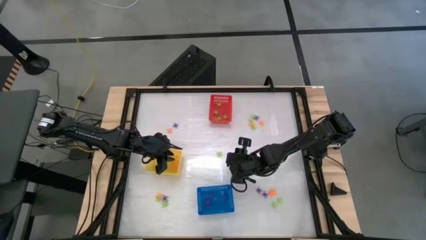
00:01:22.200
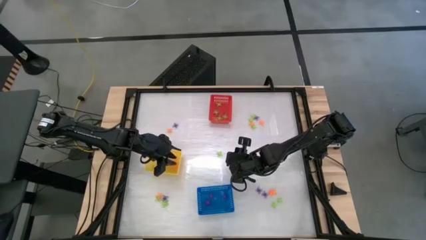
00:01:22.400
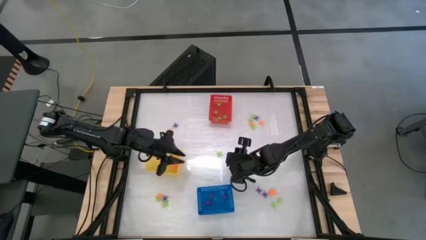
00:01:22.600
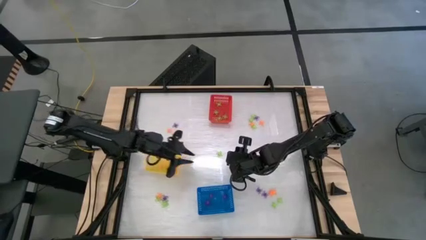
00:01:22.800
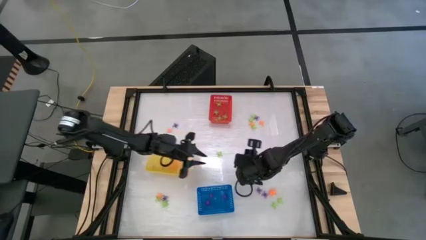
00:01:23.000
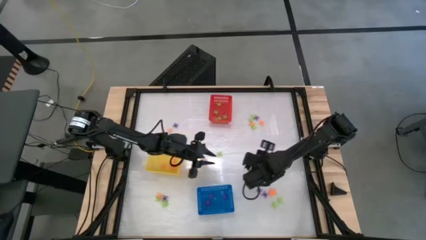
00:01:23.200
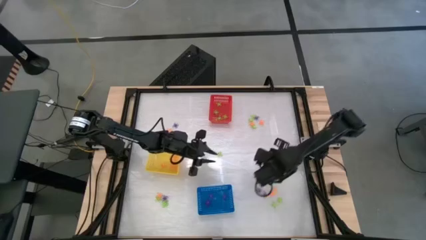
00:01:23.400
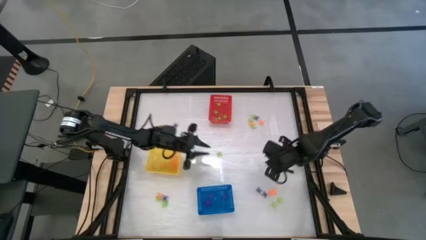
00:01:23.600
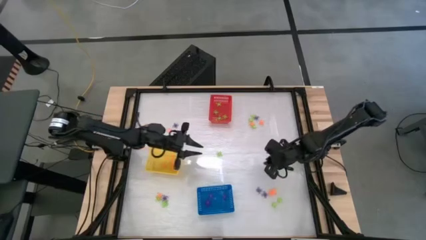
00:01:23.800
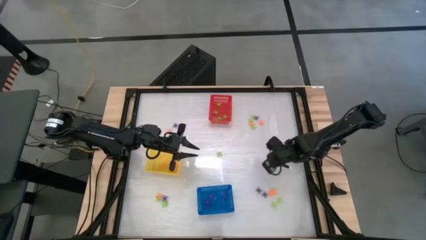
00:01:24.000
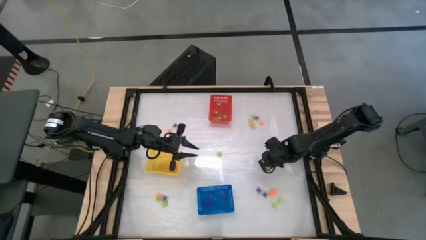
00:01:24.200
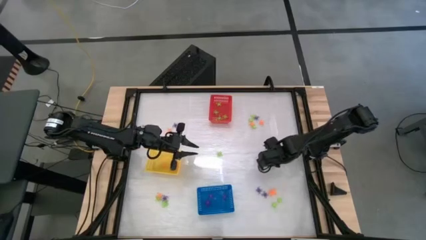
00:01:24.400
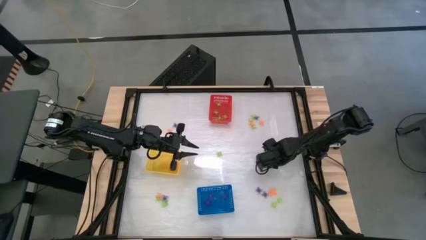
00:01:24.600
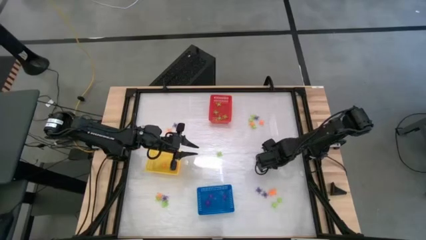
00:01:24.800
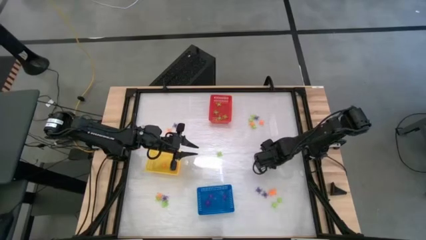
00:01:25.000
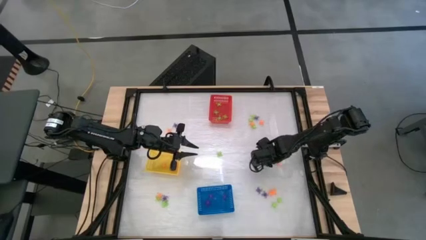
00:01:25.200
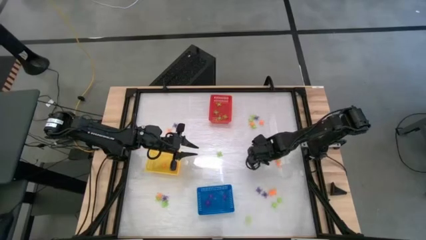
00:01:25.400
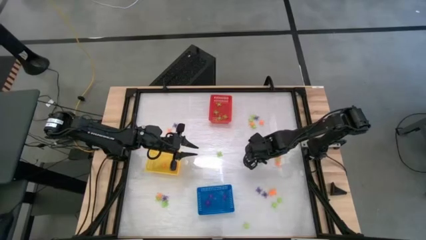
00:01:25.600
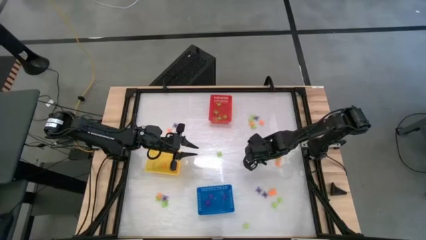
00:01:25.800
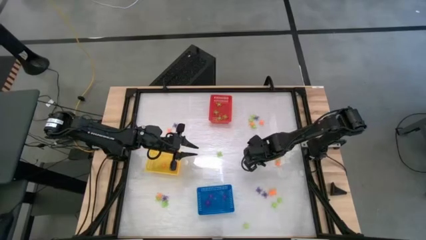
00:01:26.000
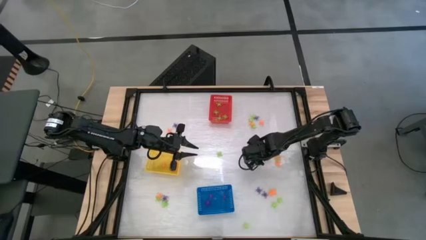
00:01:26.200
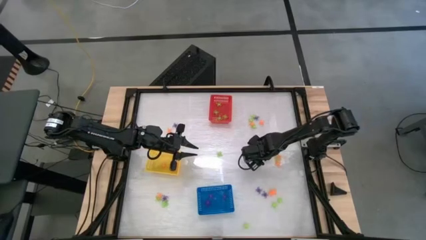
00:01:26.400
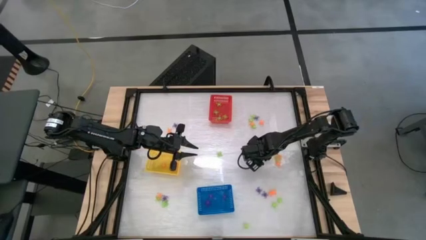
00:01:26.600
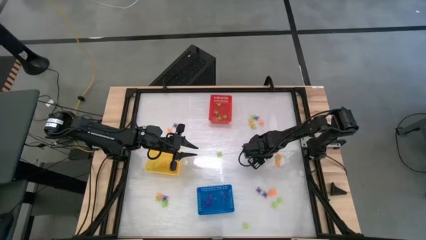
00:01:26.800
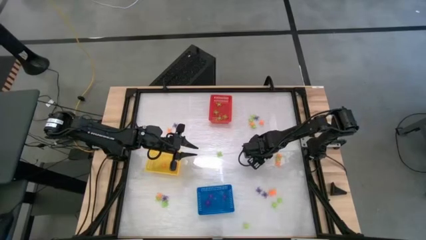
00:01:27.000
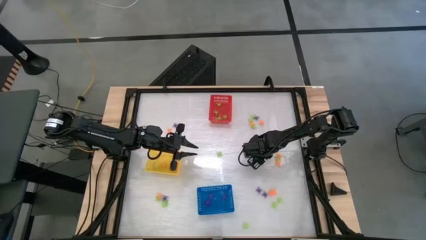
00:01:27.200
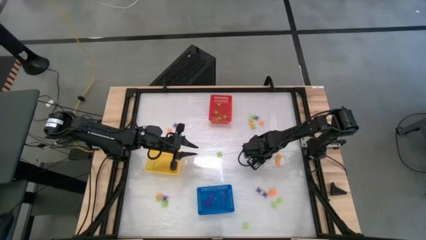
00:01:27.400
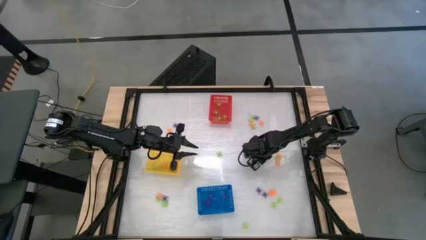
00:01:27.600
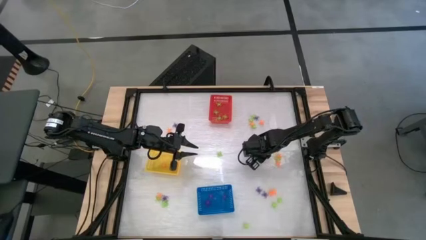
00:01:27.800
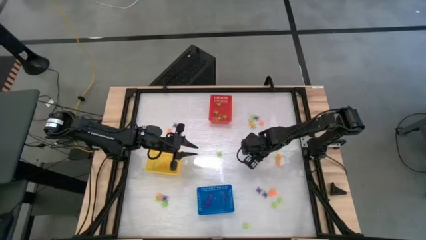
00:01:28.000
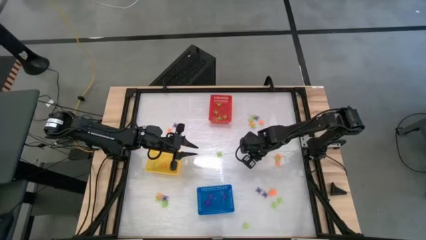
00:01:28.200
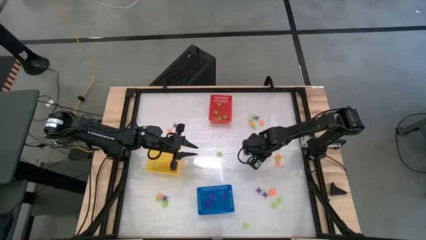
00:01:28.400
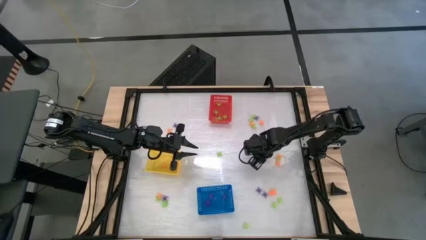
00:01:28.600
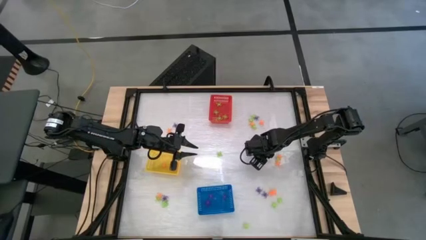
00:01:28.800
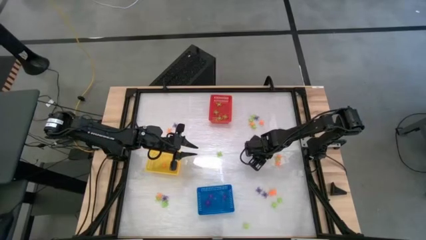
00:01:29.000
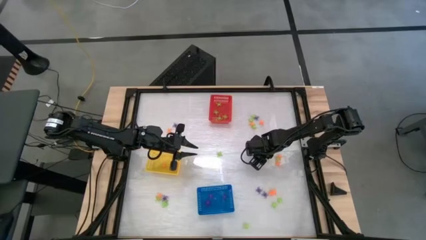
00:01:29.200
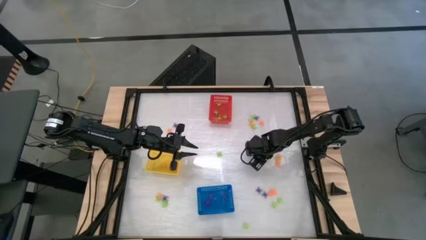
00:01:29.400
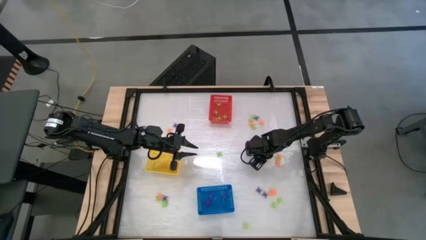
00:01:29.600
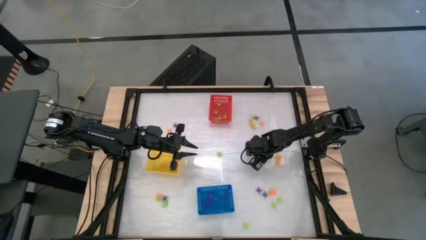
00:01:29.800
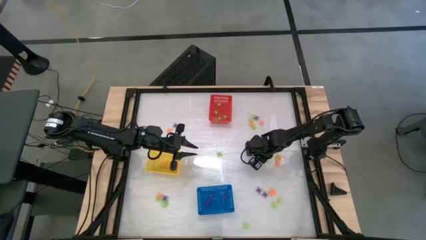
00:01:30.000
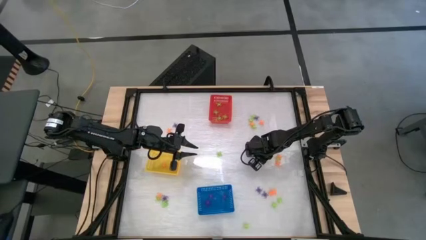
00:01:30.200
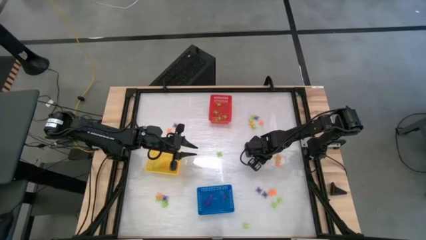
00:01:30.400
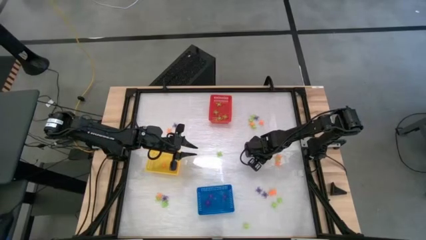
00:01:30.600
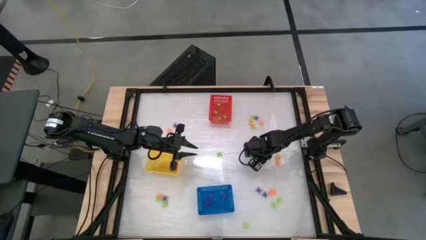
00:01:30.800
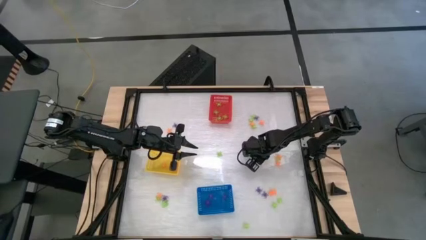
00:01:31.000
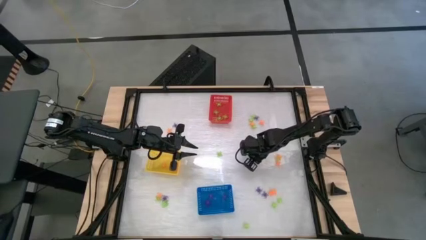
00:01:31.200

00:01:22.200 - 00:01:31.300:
Task: Sort Halloween decoration
Put the green spider toy into the red basket

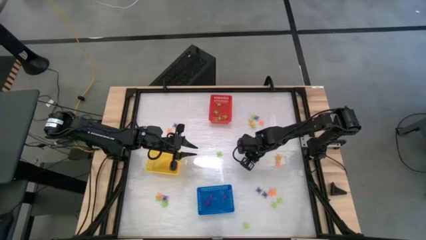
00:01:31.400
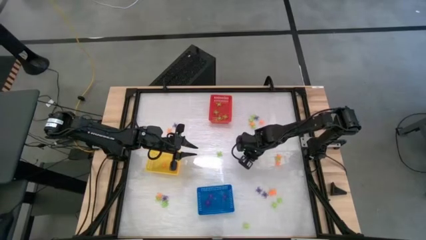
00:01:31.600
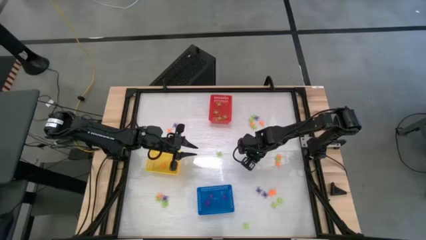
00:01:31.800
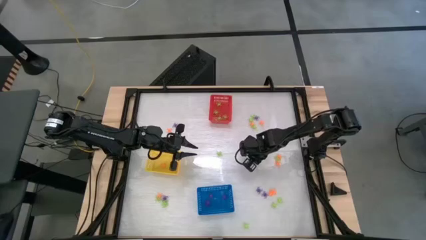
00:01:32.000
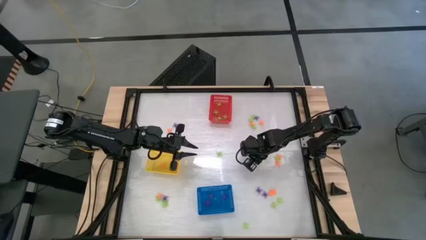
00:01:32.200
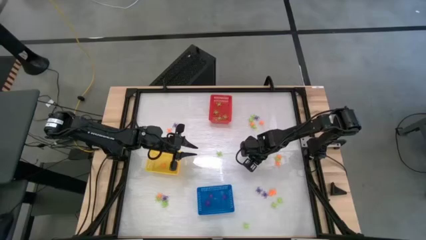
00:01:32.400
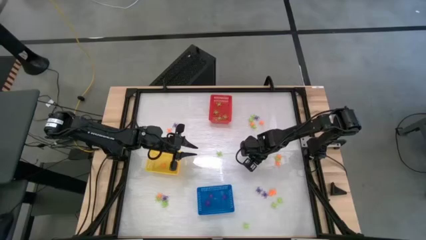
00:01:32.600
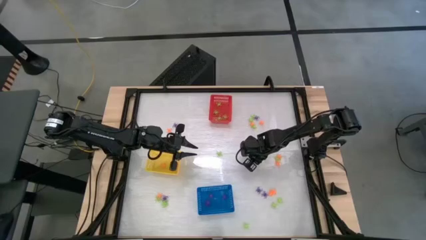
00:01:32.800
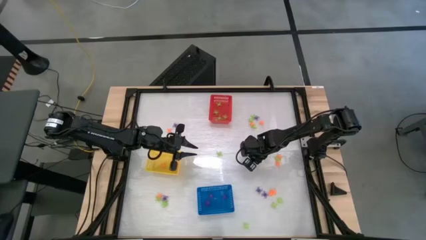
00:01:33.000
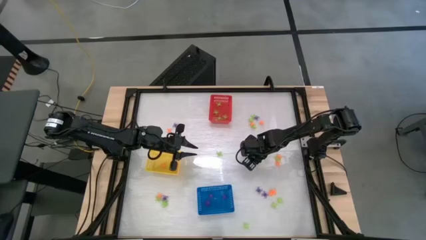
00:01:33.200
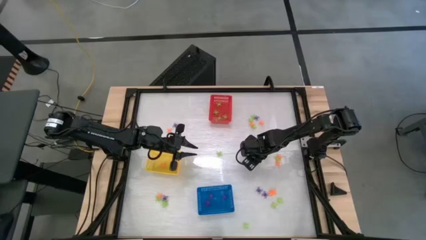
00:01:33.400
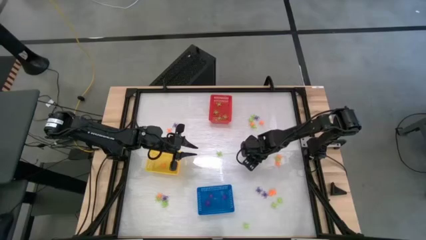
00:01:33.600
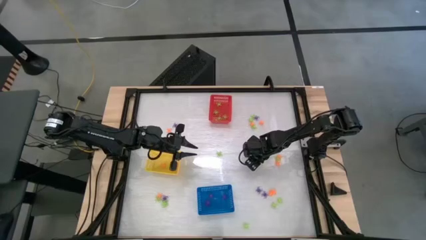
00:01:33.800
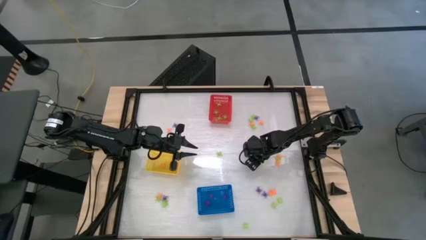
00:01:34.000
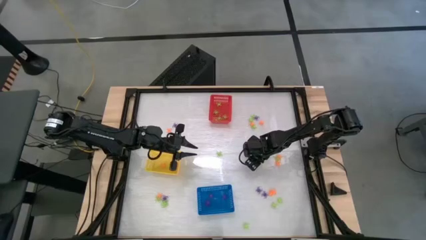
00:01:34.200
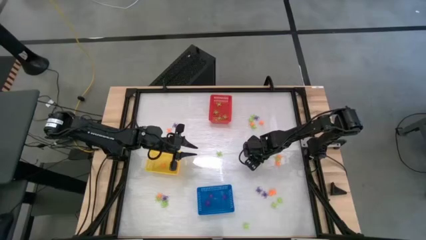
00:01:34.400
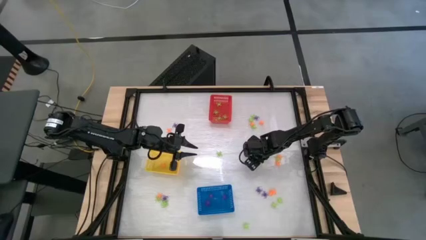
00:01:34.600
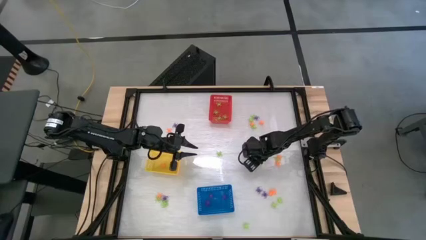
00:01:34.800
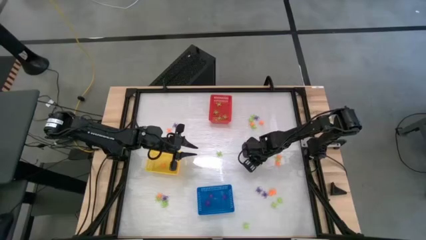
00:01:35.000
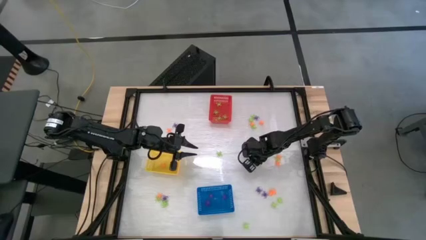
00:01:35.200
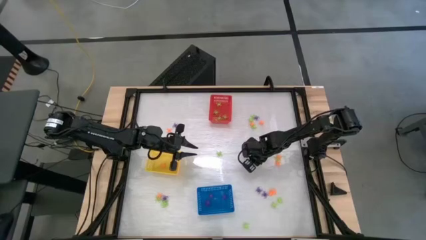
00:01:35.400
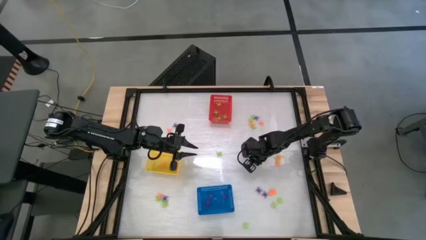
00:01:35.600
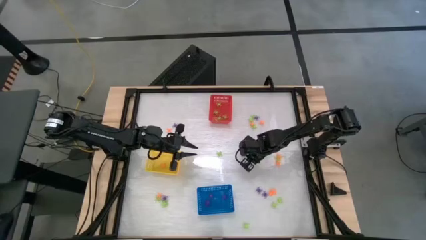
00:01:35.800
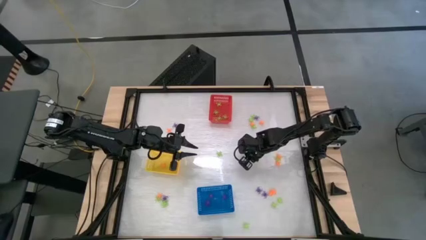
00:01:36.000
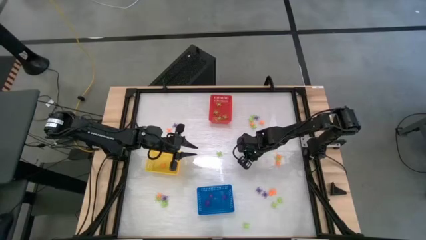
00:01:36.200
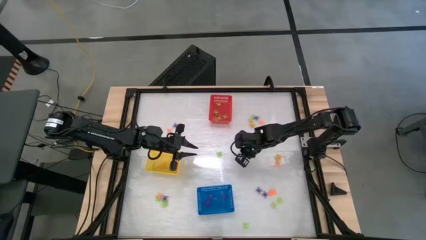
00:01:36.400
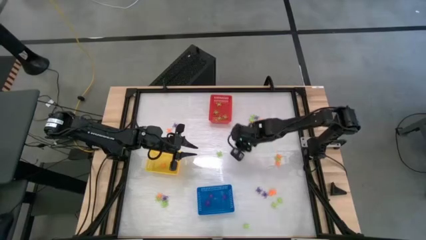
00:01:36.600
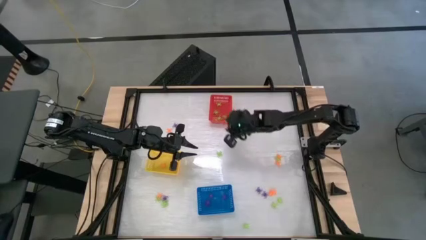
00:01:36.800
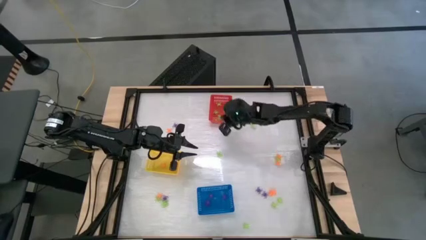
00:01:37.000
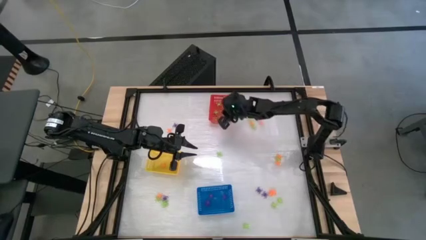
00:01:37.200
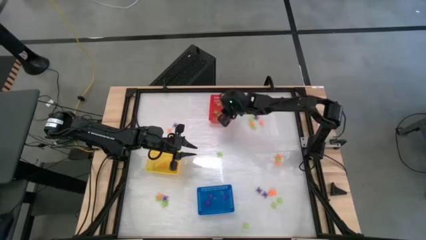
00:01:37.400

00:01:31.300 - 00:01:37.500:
Put the green spider toy into the red basket

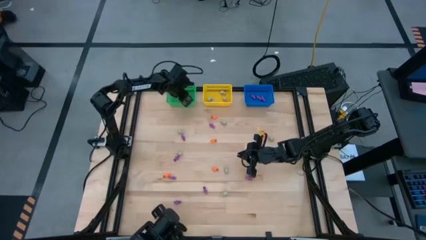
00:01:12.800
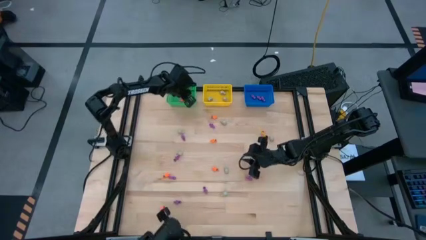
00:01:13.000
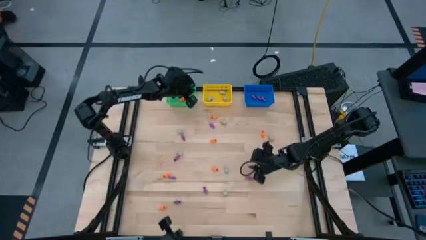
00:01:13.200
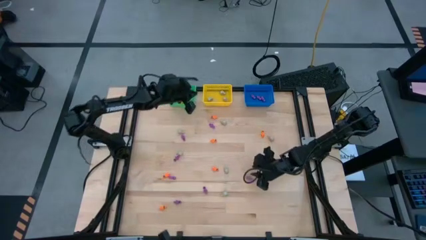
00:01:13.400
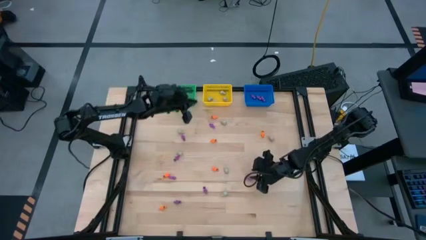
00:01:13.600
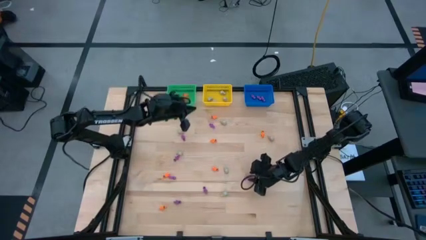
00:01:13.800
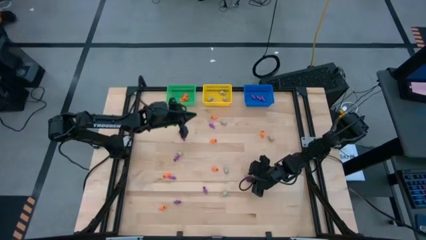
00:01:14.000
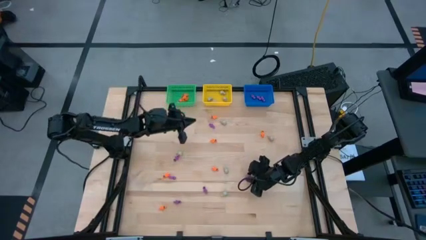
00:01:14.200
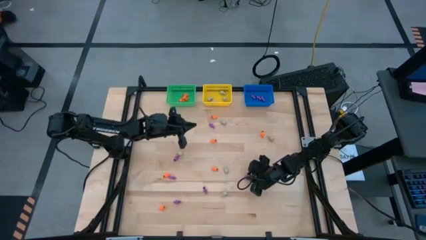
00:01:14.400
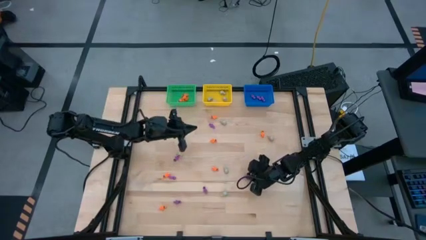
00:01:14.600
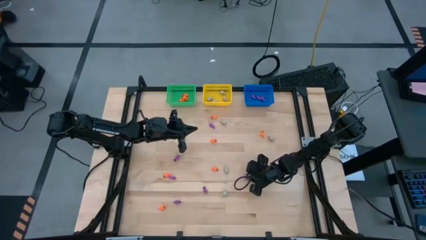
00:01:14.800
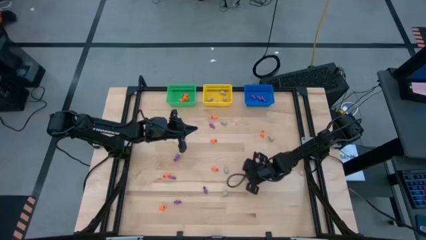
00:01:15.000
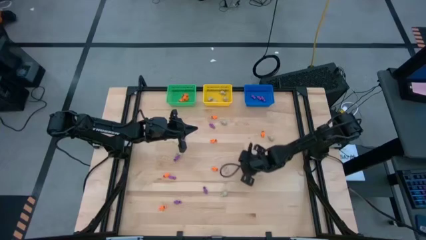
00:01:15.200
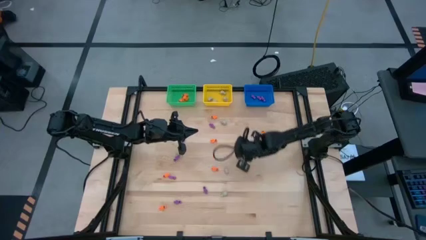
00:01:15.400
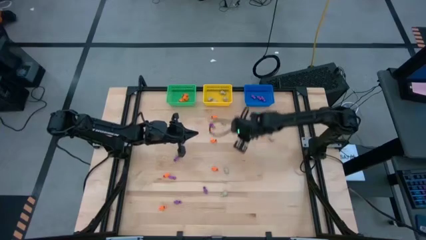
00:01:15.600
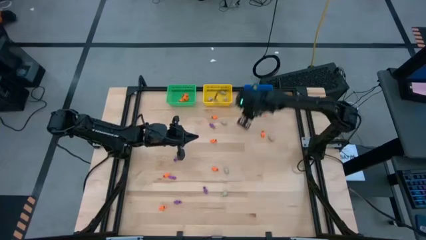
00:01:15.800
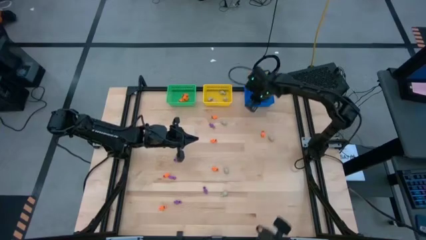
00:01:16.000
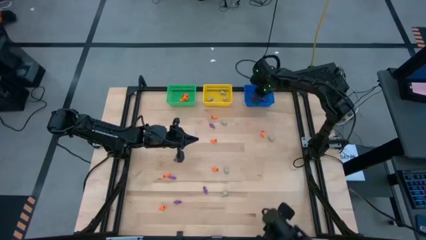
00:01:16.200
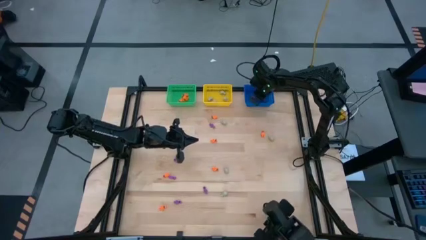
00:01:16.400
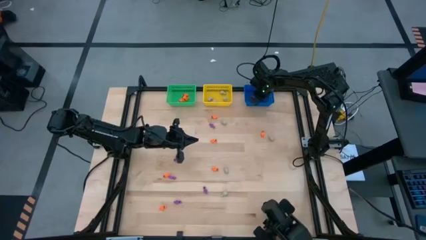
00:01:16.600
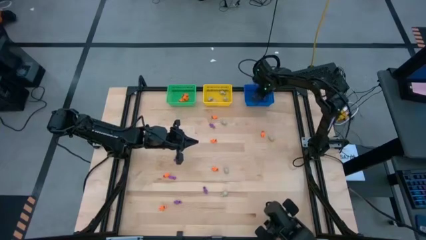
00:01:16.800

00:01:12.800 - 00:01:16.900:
Task: Sort Halloween decoration
Put the violet skeleton toy into the blue bin
